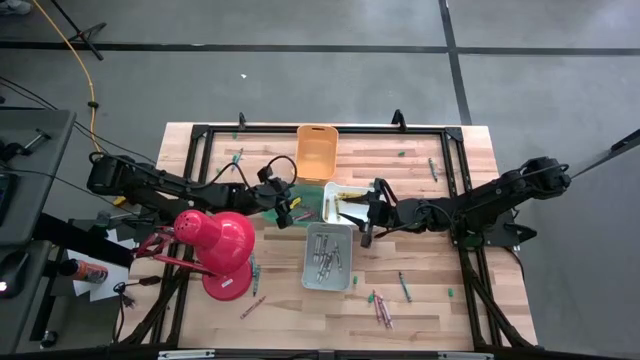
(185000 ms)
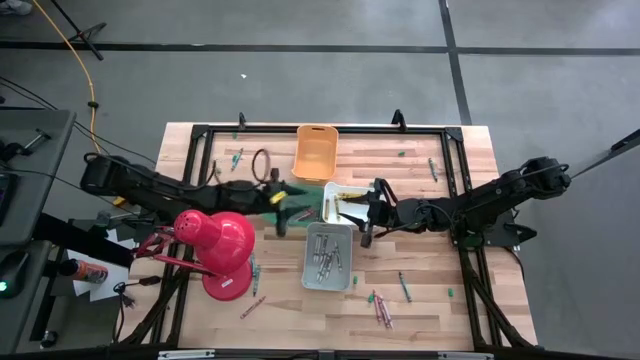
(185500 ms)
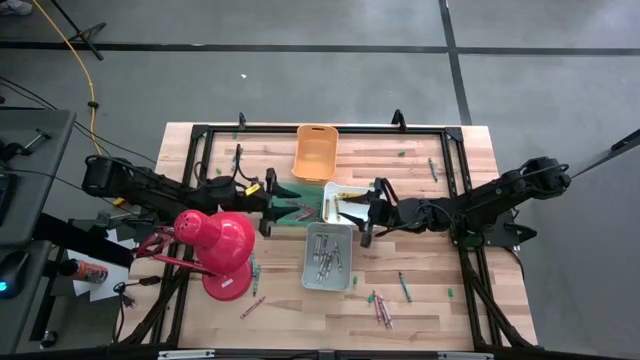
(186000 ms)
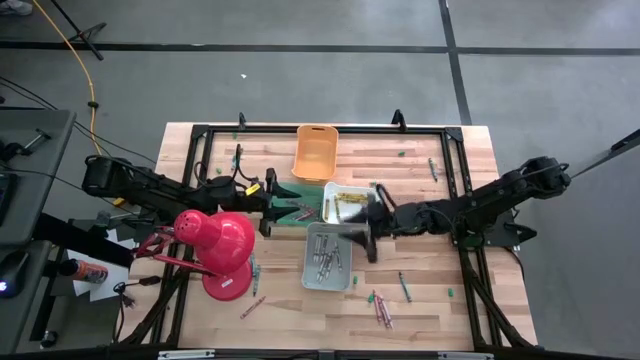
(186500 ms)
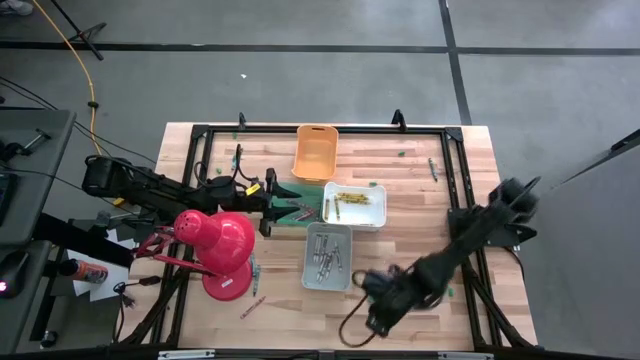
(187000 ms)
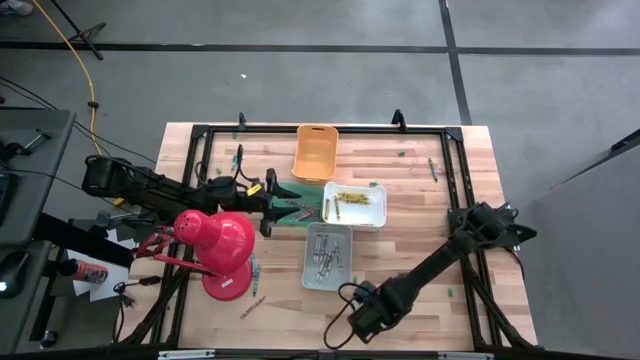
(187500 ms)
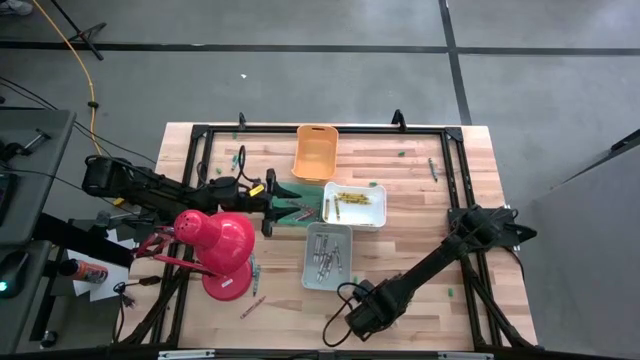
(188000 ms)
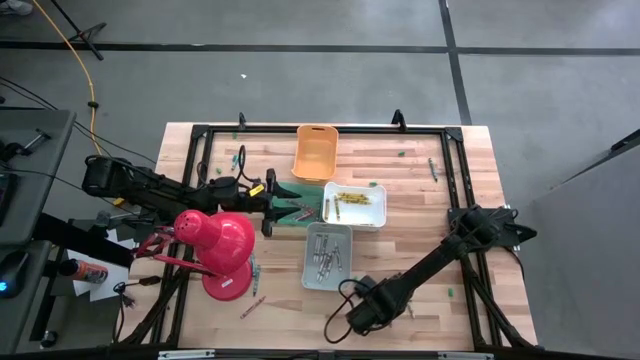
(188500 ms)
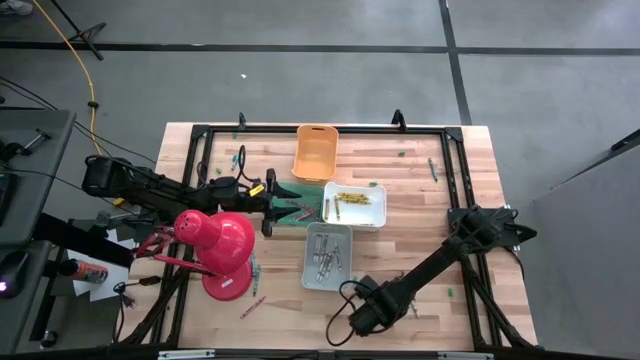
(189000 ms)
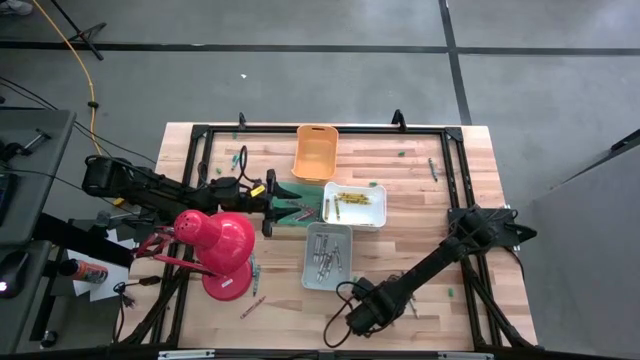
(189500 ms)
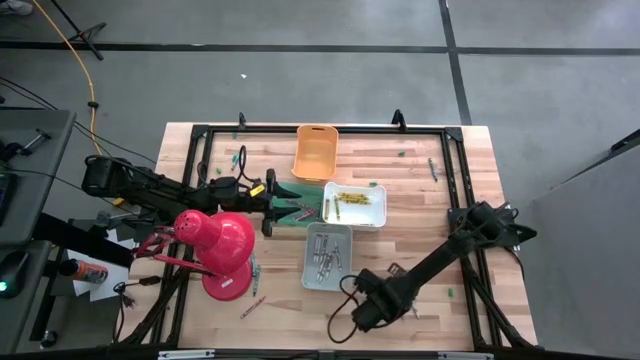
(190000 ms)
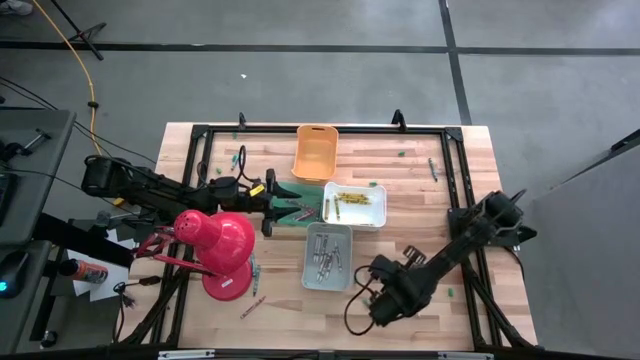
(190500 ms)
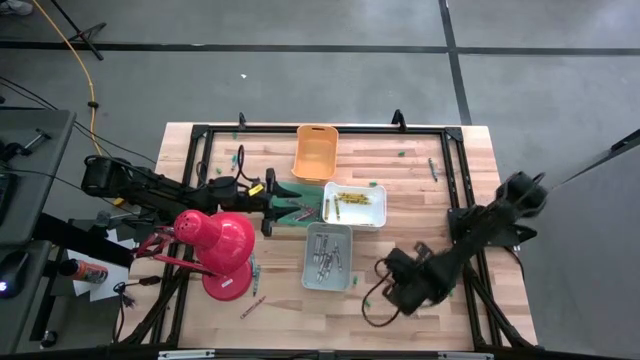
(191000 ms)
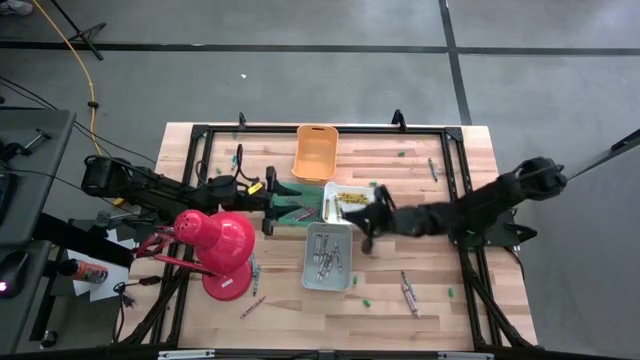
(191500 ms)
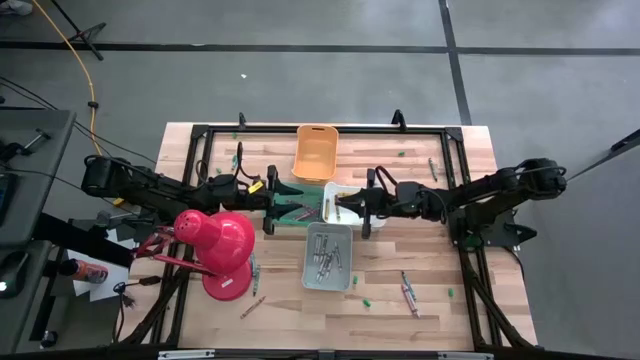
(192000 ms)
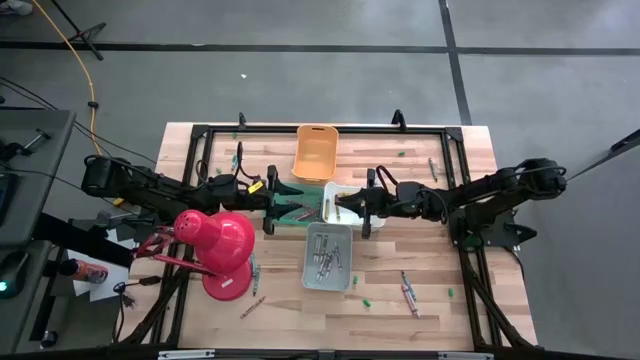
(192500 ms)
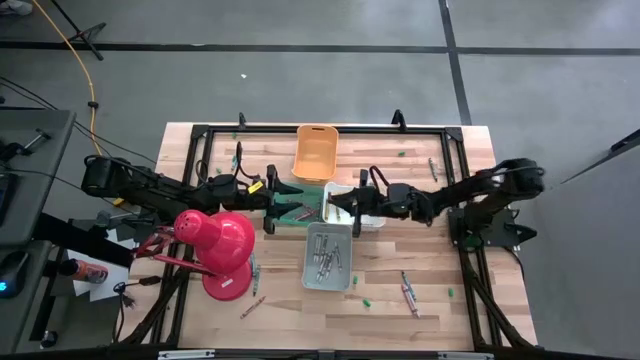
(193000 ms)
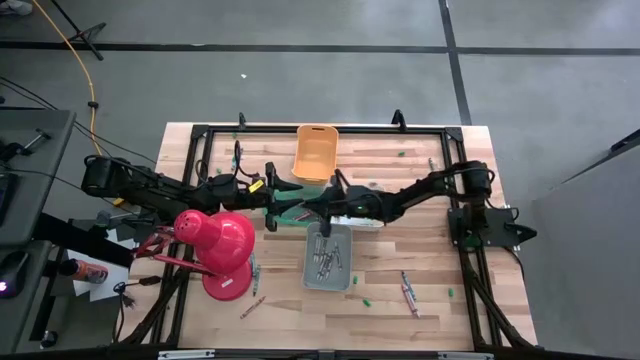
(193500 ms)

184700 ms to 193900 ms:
Task: Sort crayons
Put the pink crayon into the blue bin

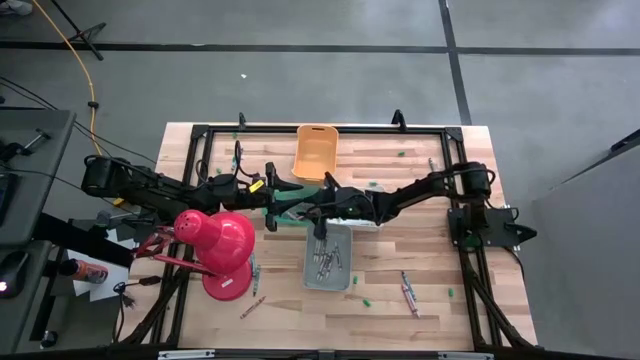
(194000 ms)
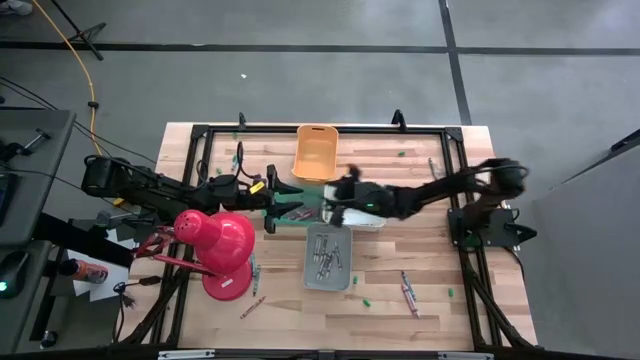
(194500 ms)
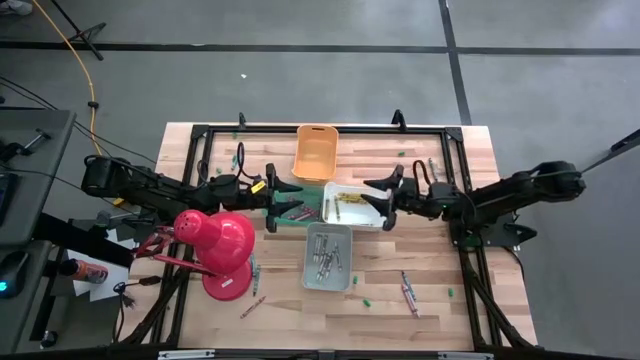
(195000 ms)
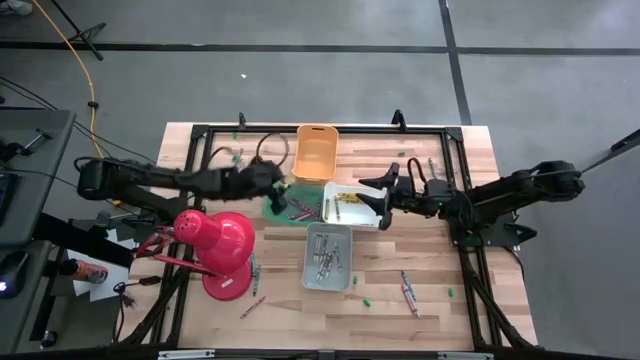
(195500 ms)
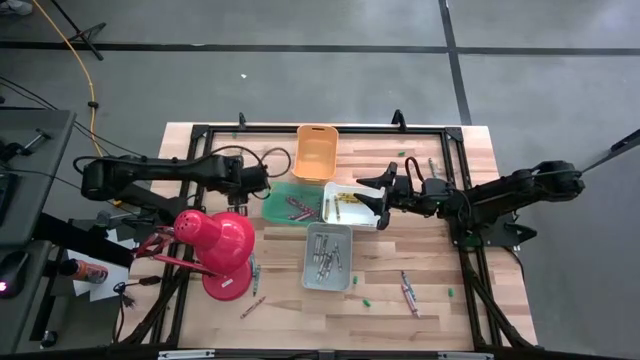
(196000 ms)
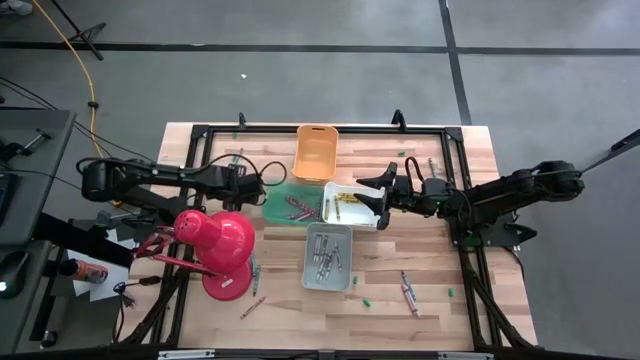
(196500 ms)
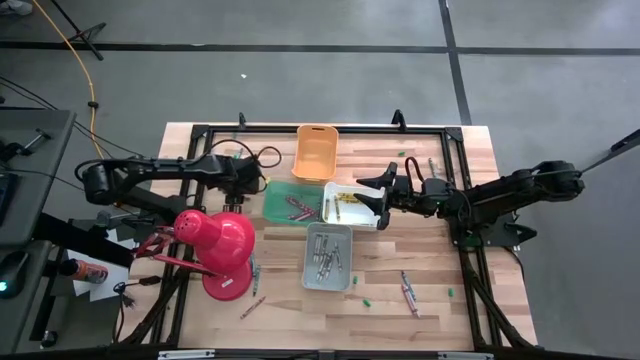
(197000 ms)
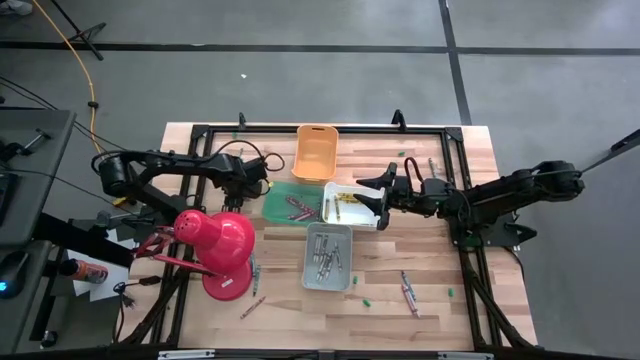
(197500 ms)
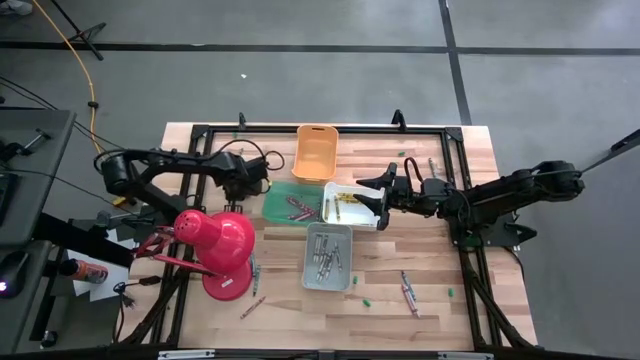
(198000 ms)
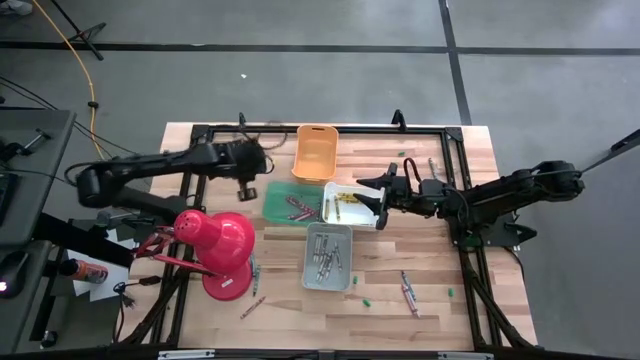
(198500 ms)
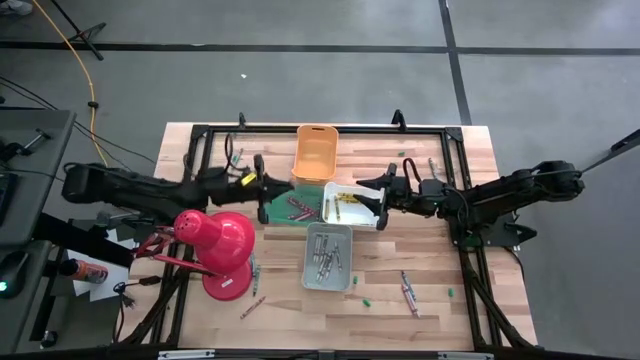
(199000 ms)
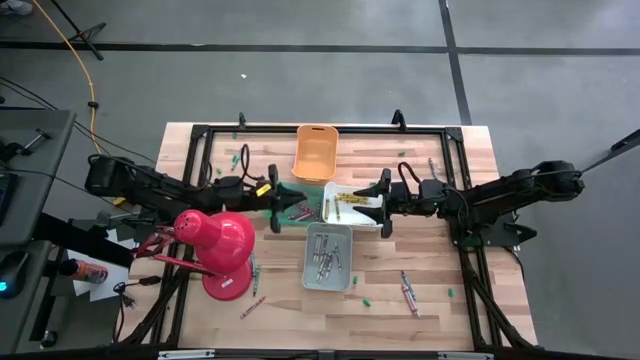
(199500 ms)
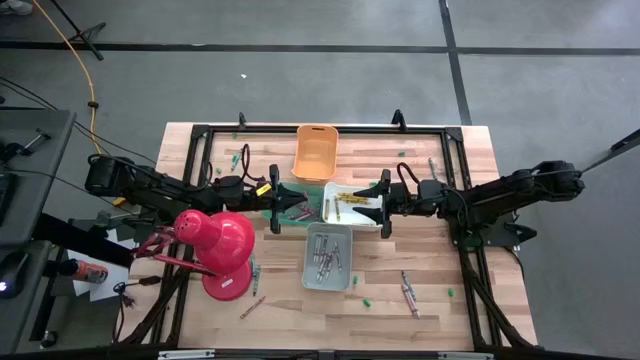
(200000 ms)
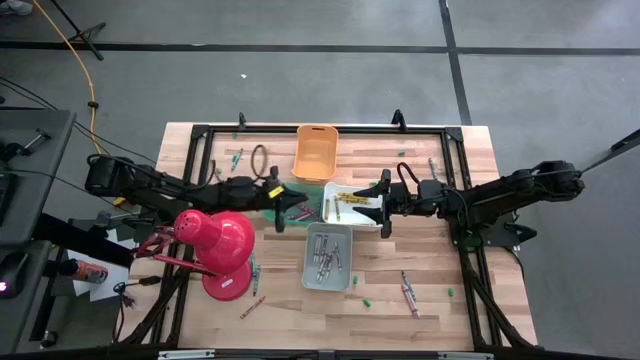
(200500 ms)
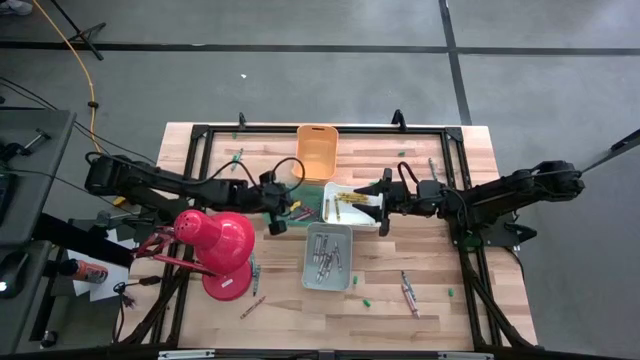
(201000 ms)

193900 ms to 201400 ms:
Put the pink crayon into the blue bin

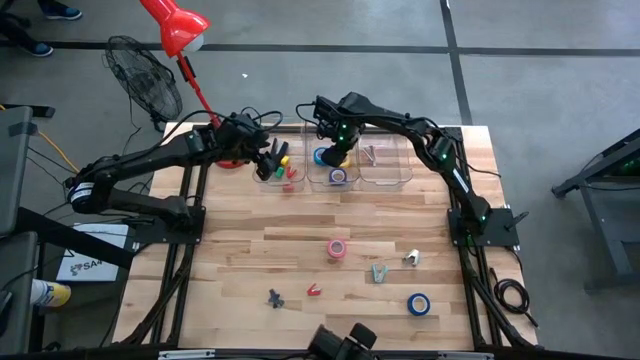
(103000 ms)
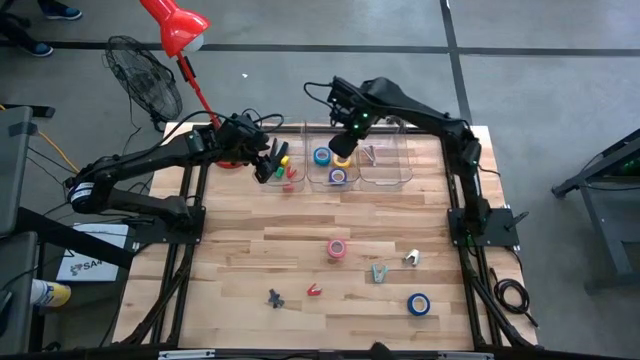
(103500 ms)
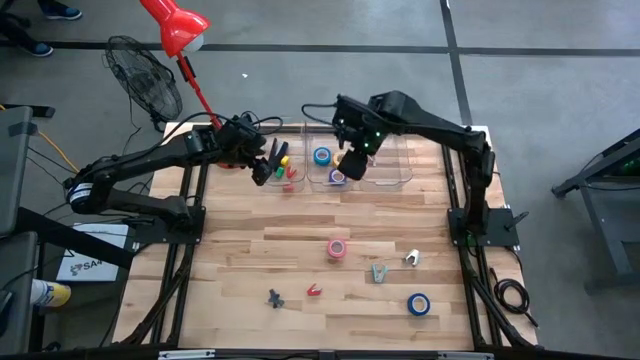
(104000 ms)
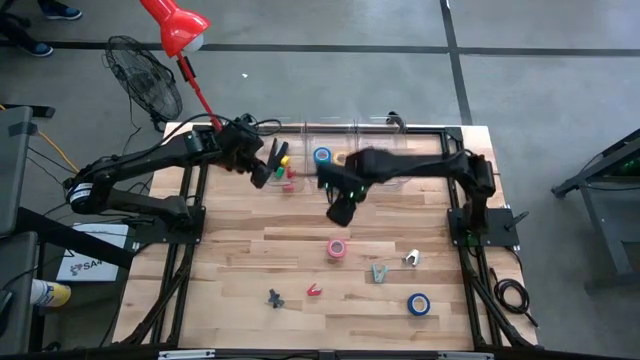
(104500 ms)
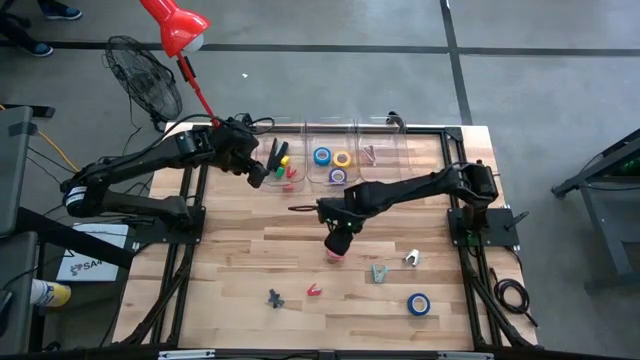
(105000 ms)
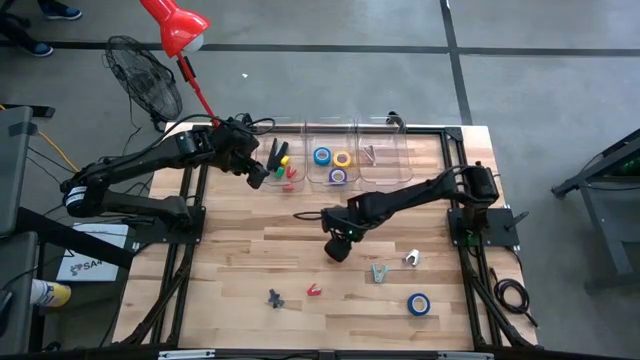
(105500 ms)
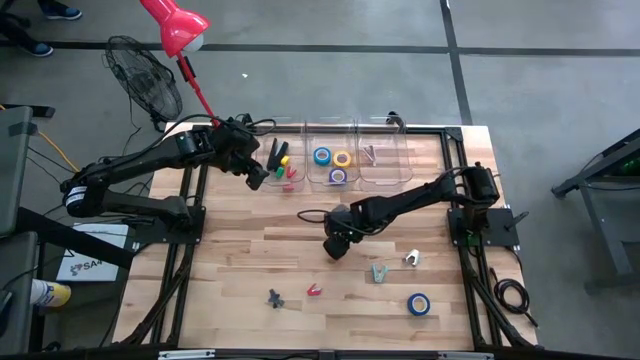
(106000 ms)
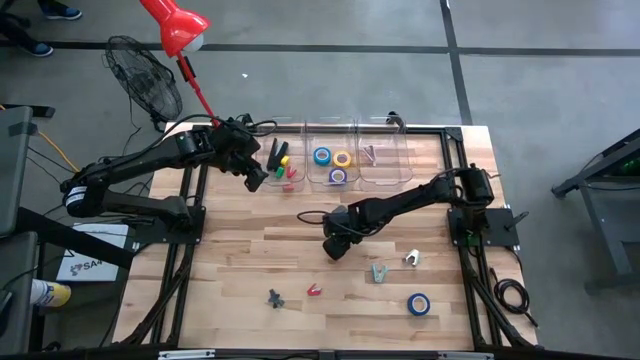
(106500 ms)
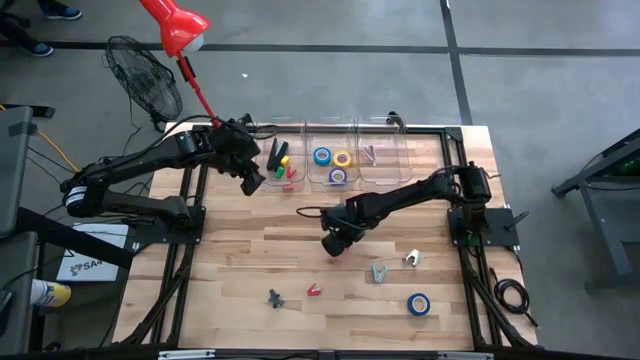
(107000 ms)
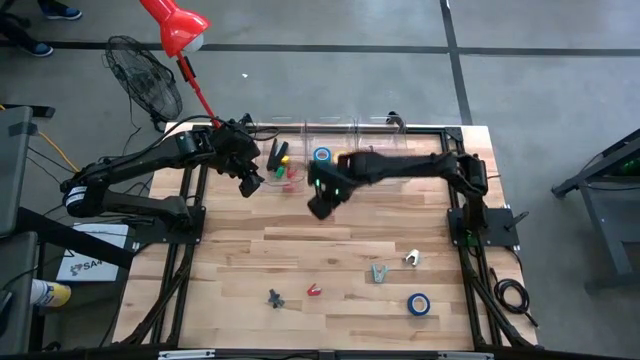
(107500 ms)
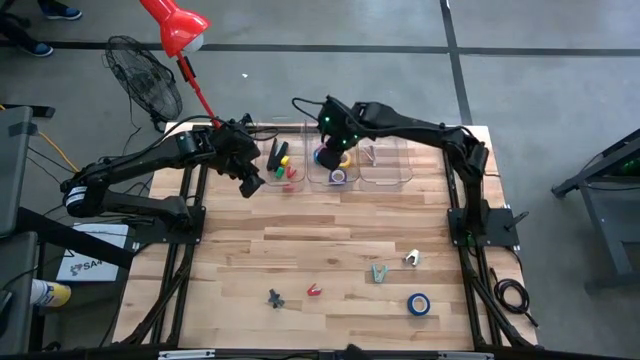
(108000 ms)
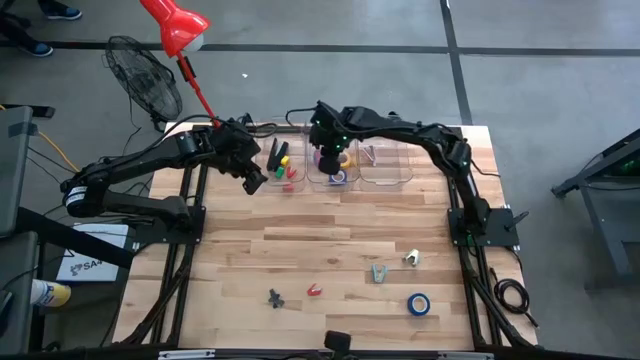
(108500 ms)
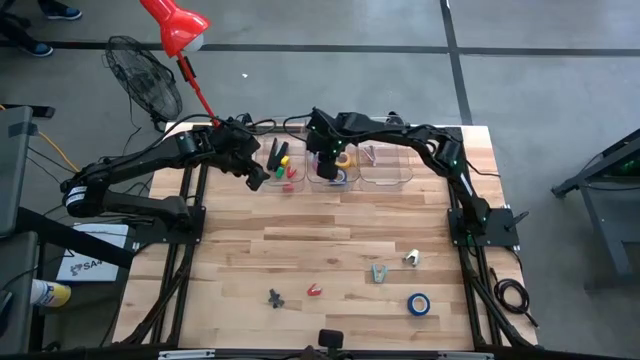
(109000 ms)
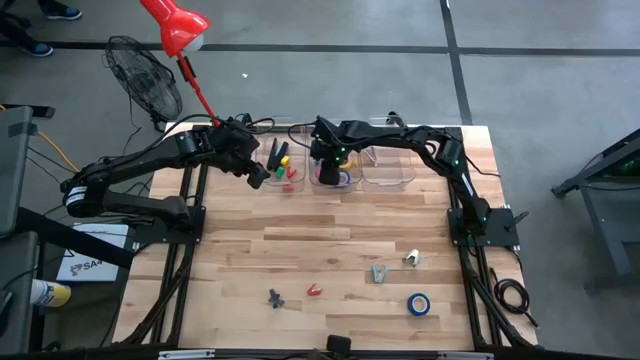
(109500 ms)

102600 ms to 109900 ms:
Task: Pick and place Stapler, Stapler remover, tape
Put the pink tape into the middle transparent bin
